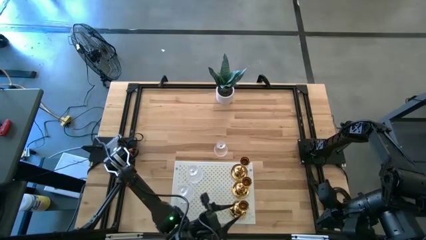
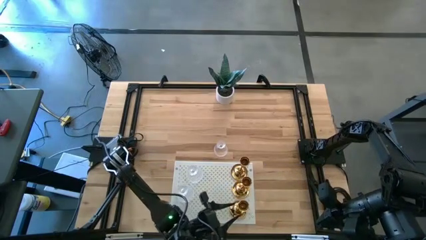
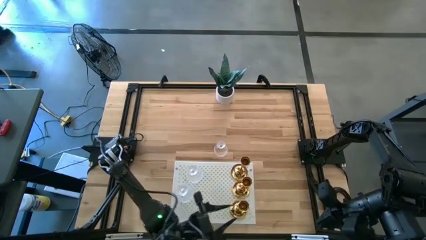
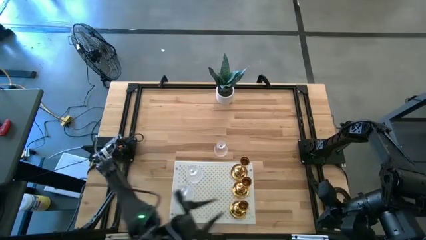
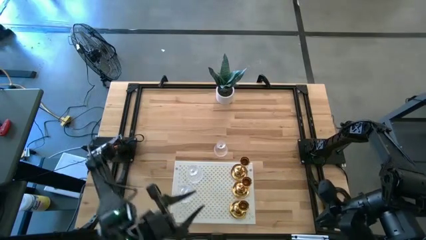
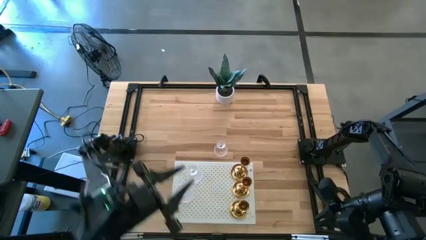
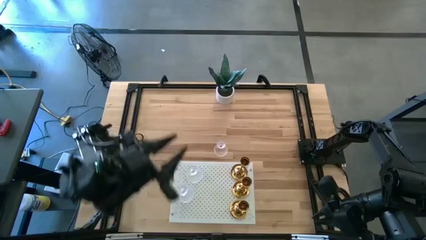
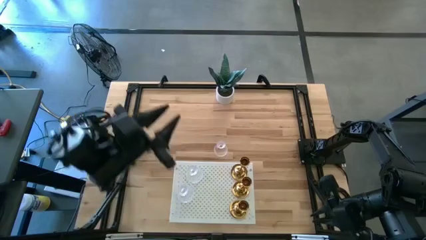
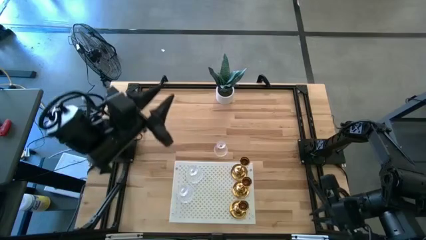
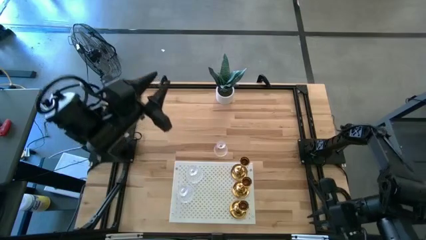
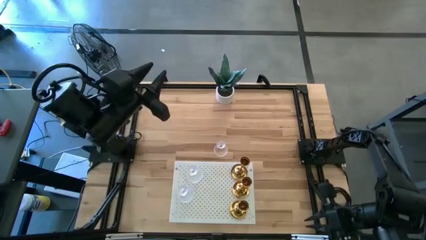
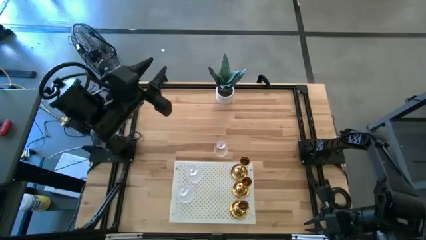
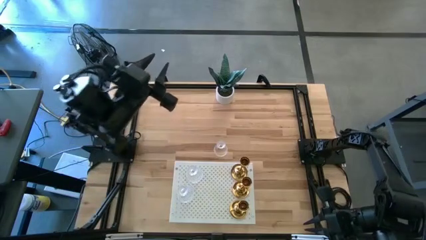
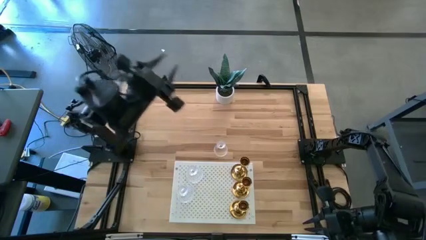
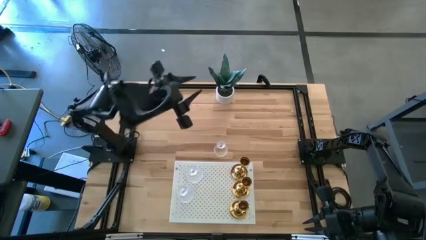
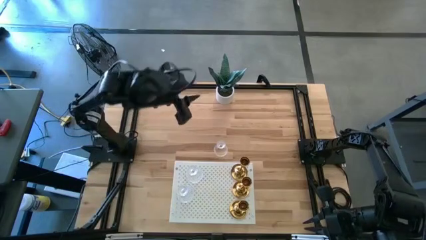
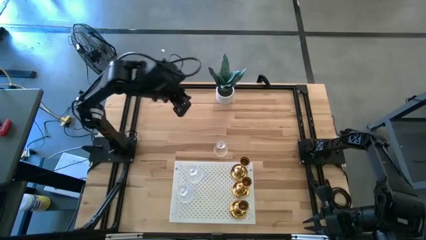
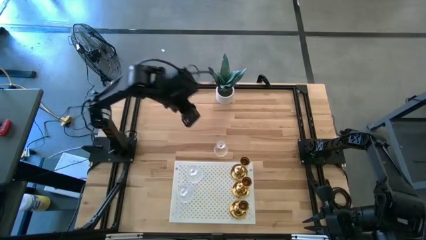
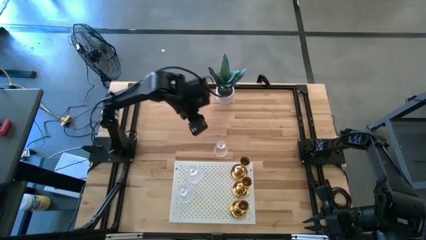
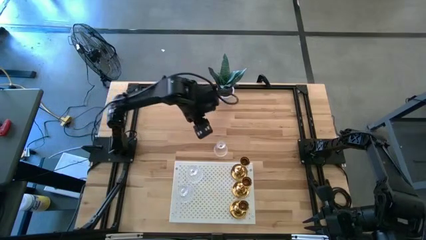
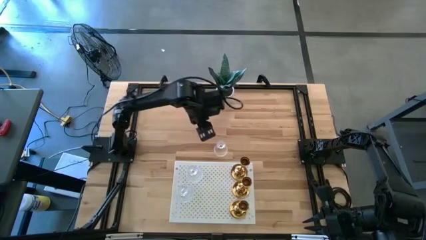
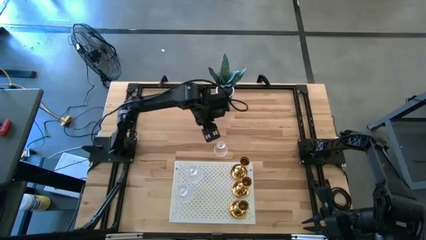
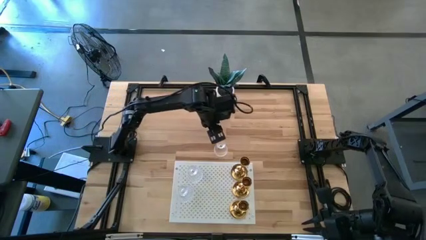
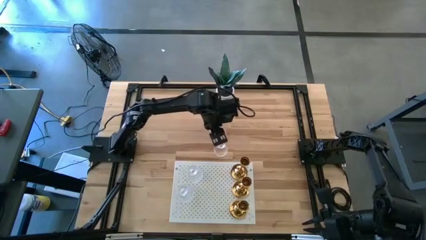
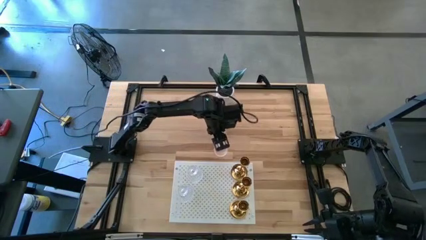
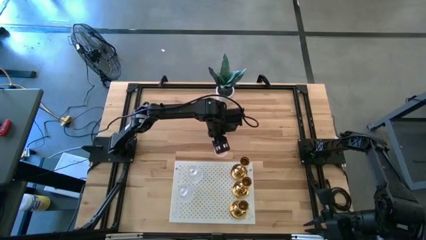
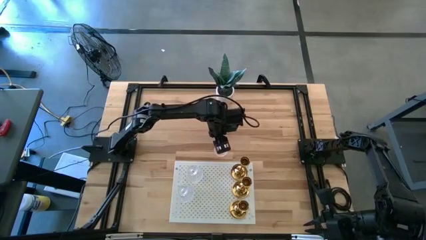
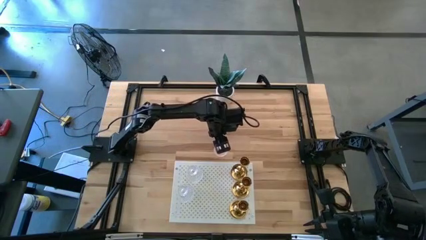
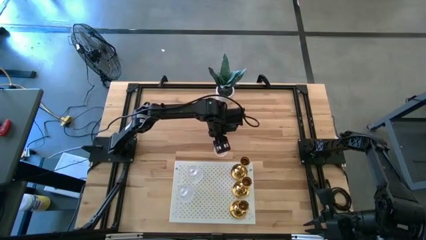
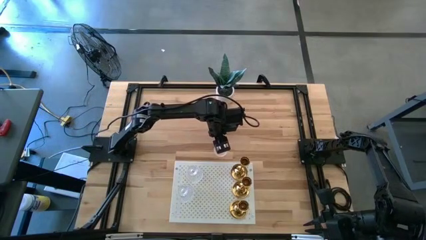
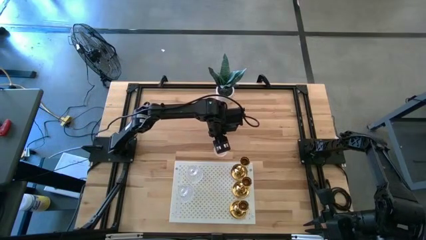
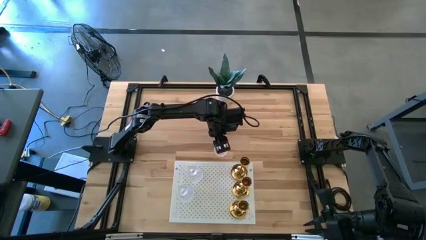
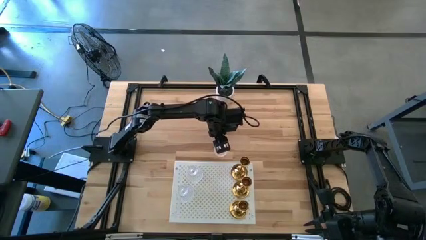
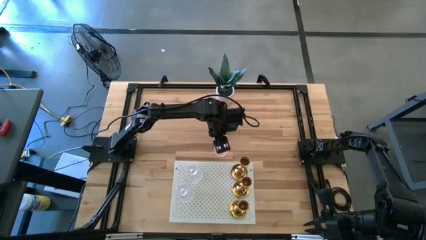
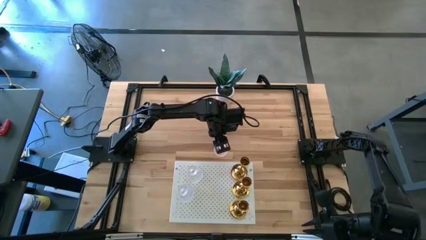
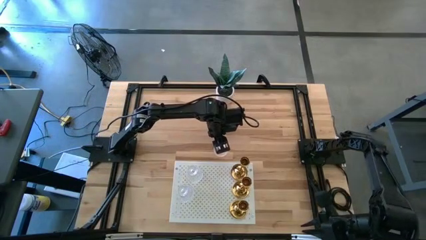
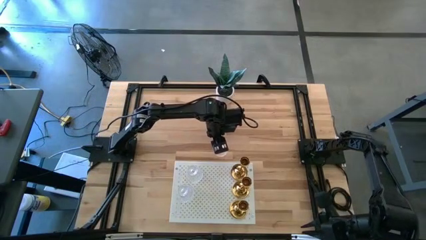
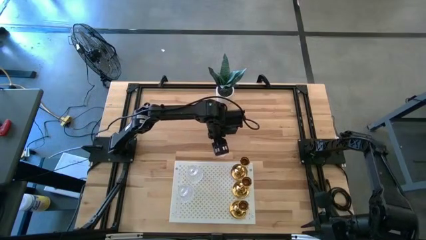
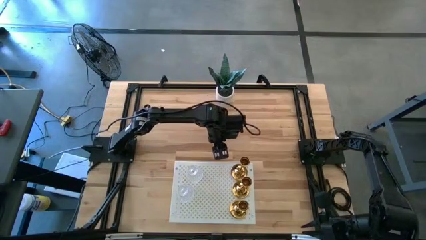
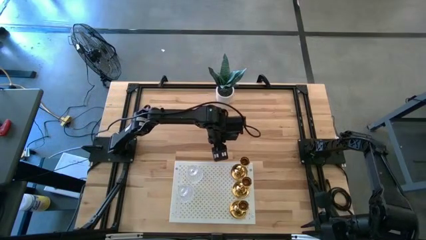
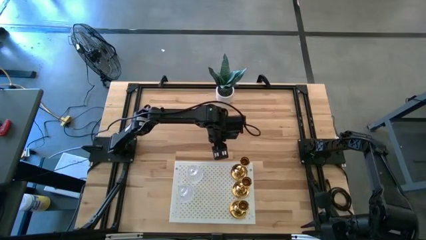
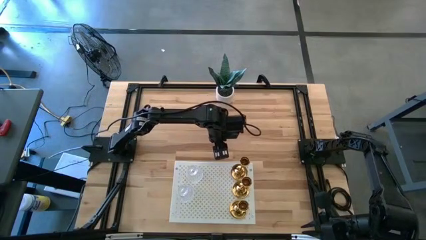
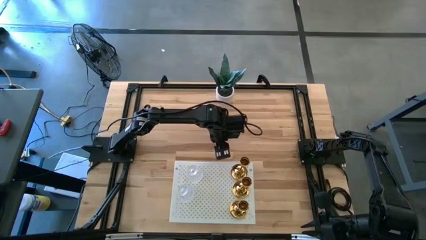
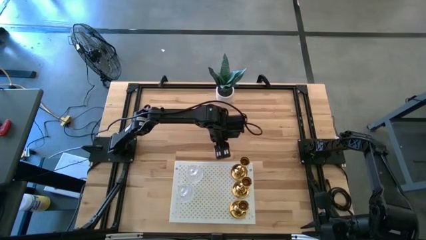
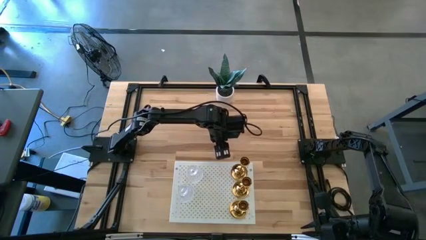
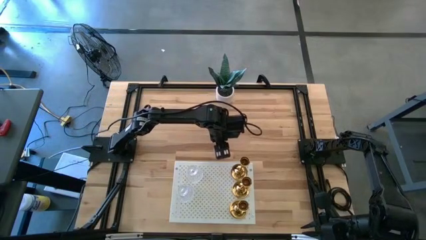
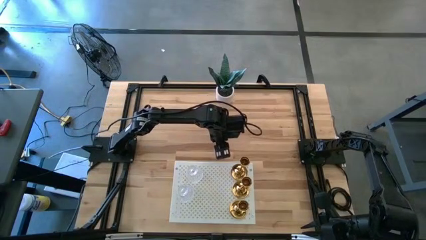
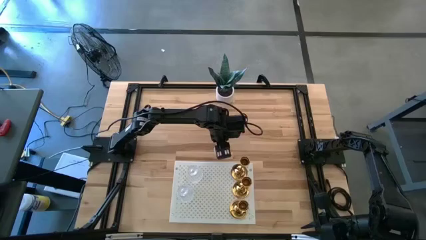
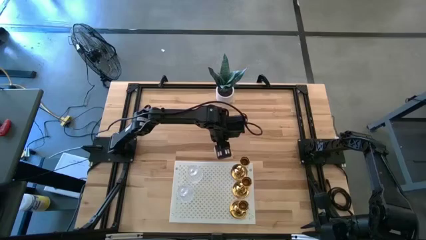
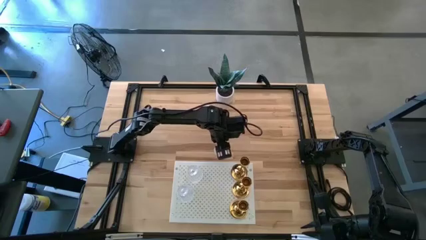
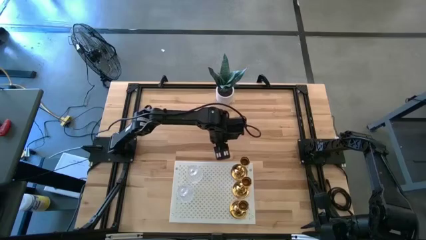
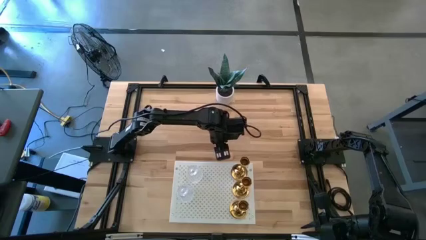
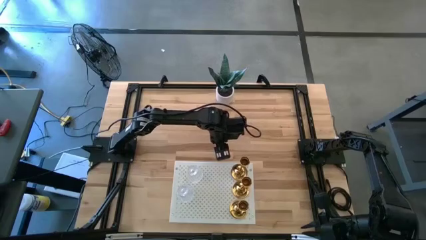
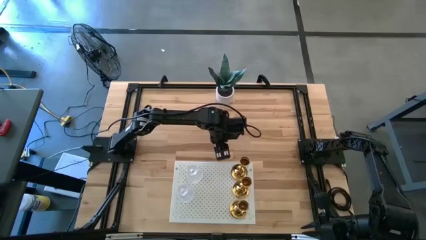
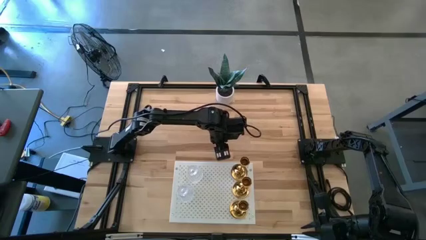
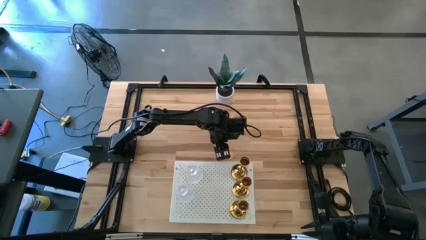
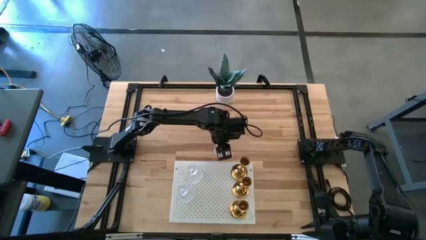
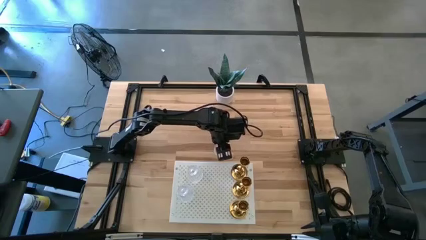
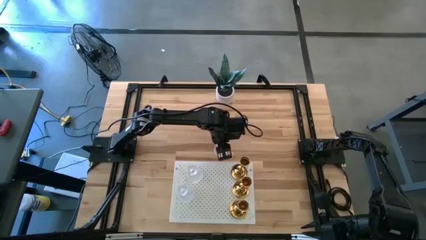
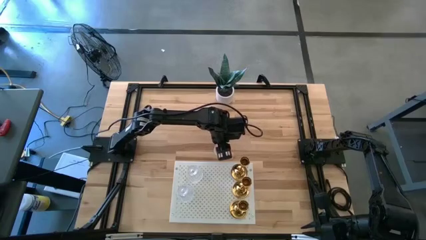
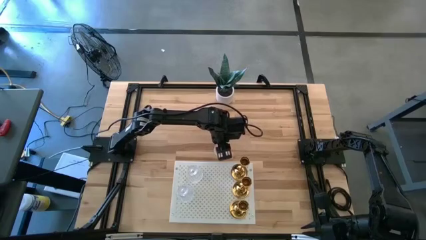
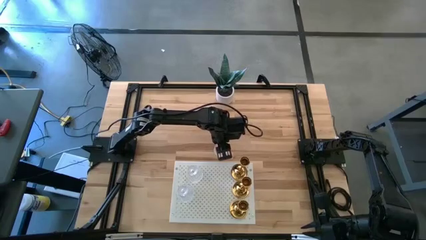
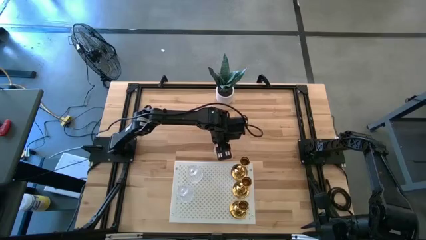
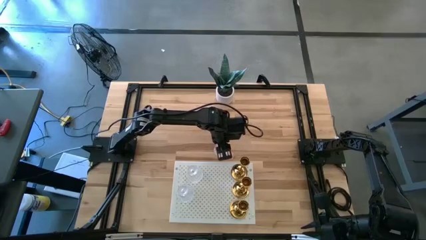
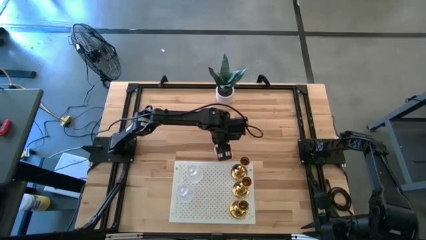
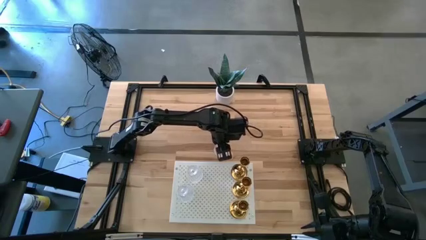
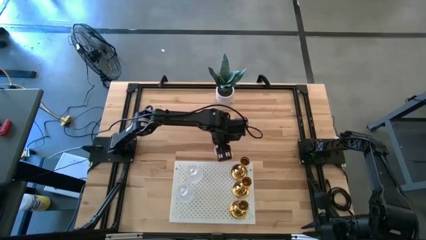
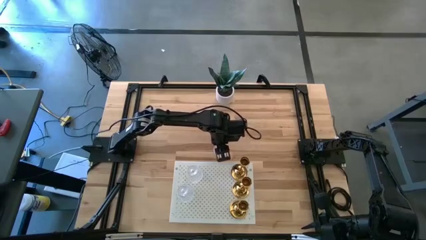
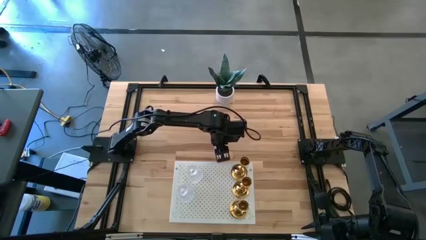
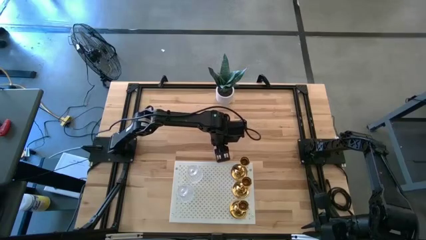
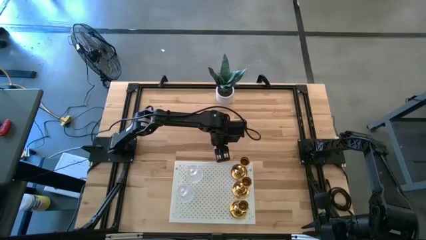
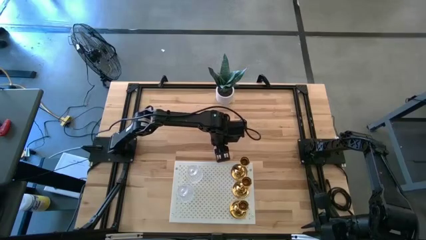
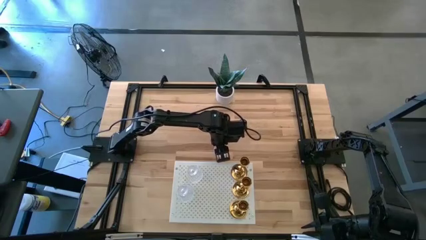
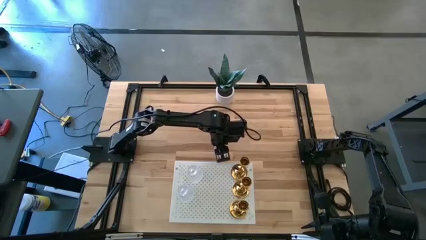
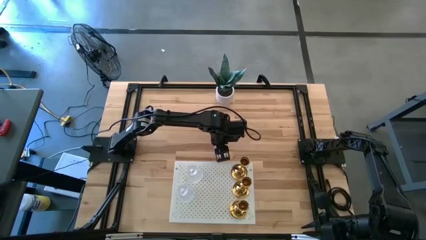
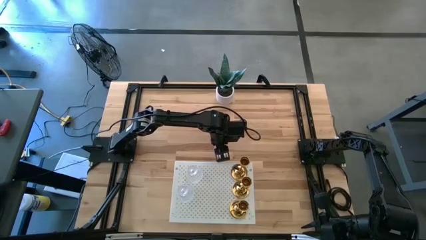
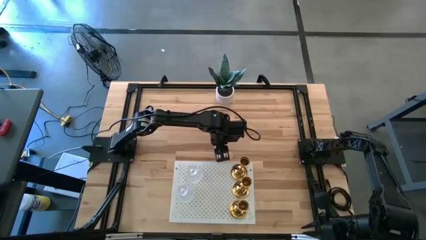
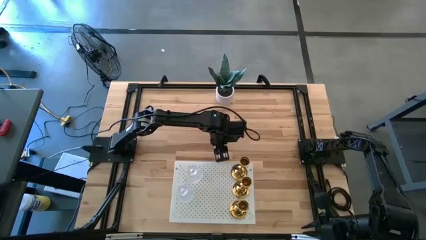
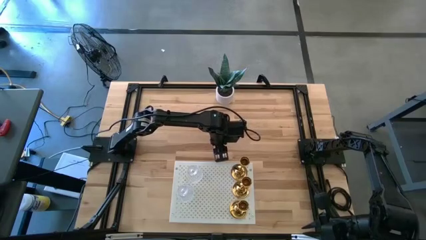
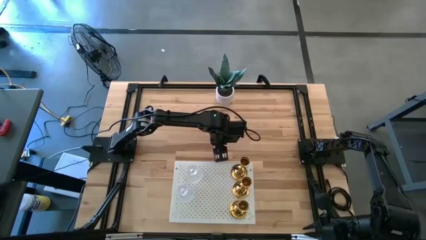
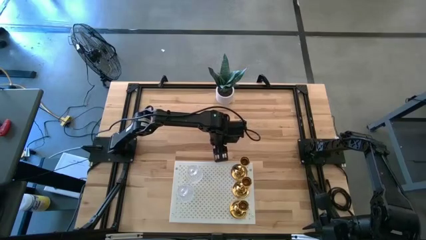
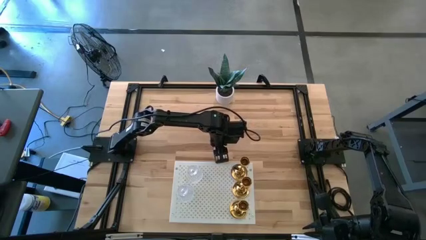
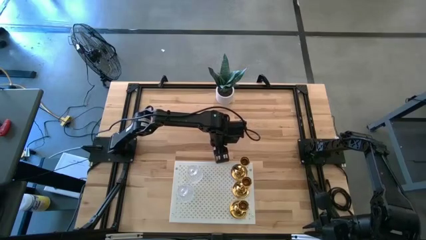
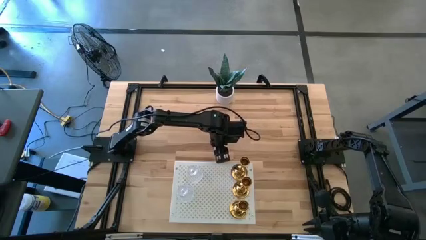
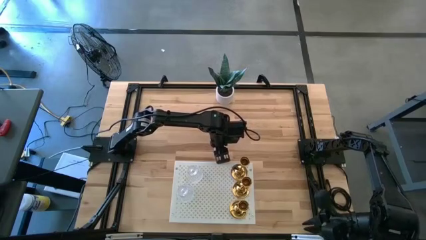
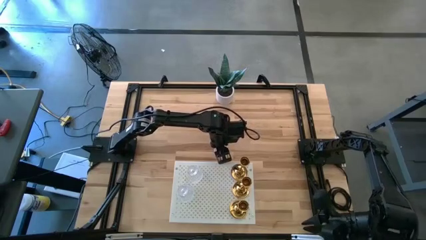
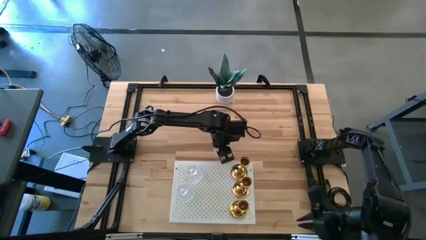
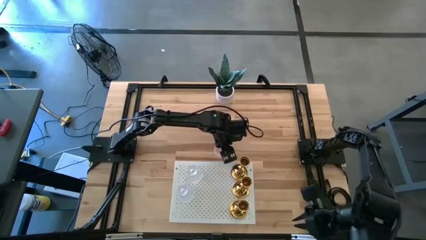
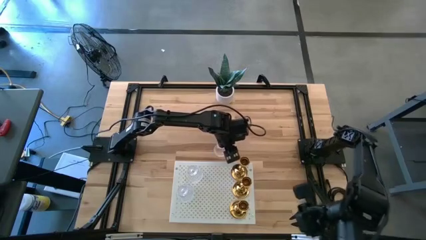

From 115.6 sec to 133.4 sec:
Task: Pick & Place candle stick holders
Put the glass candle holder on the shelf
